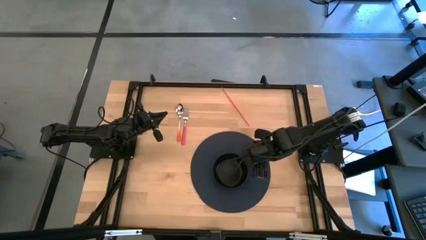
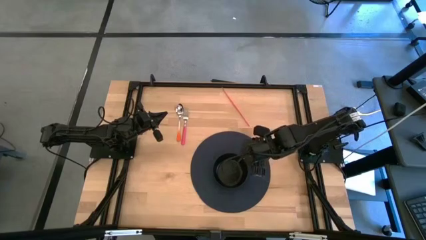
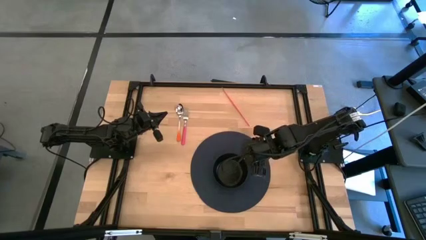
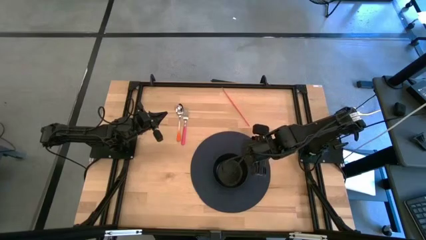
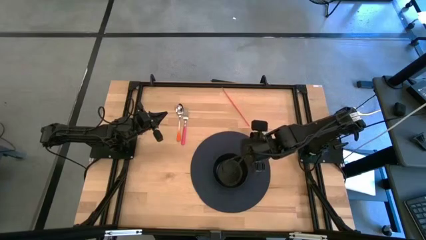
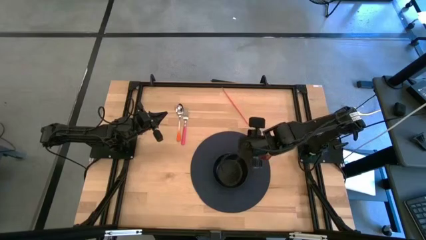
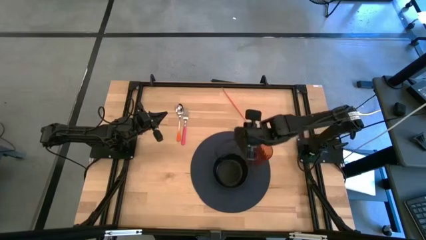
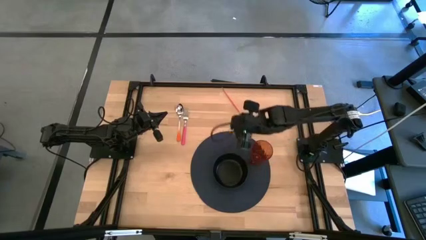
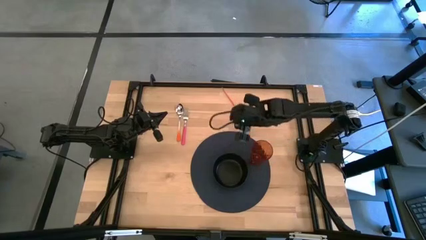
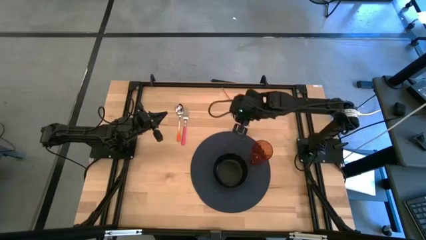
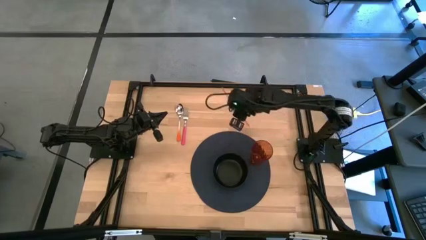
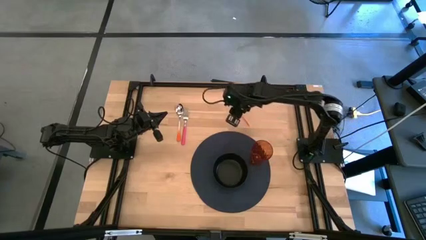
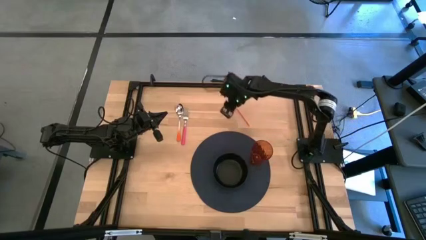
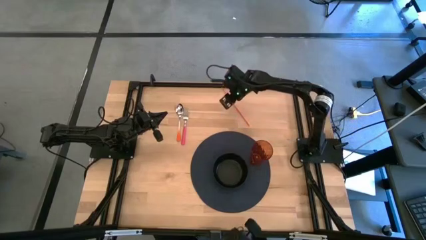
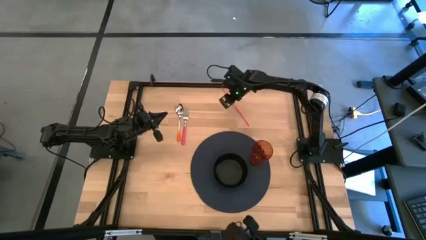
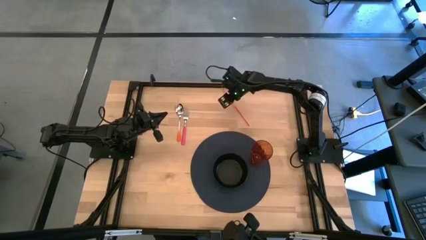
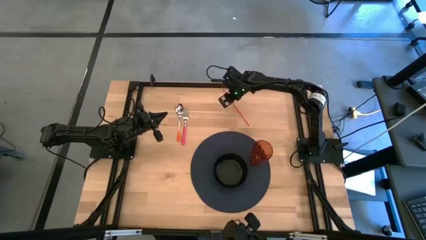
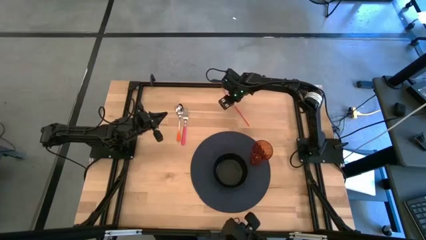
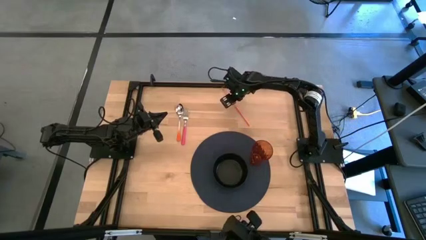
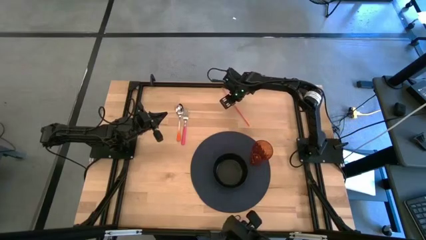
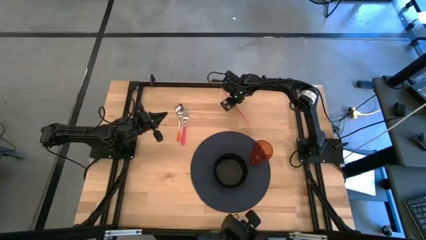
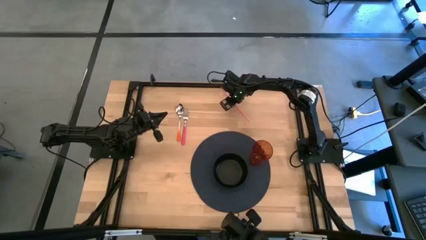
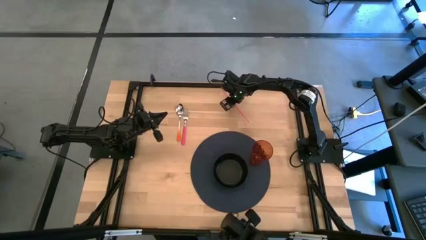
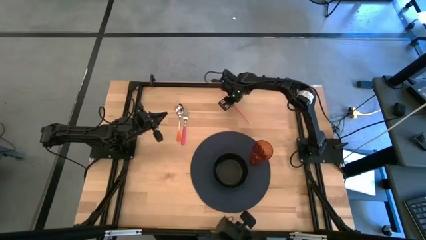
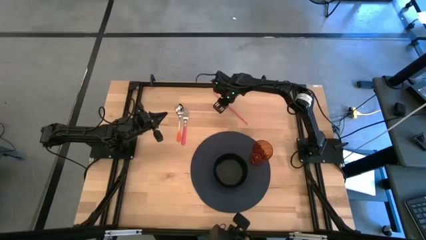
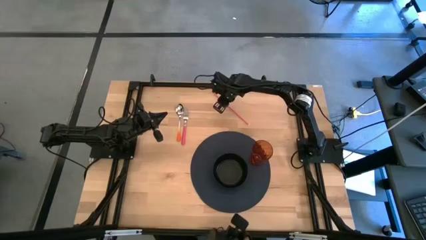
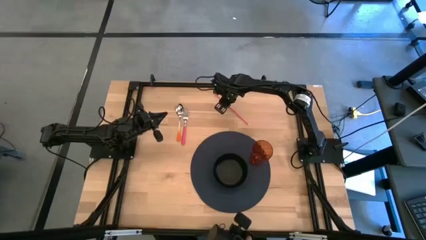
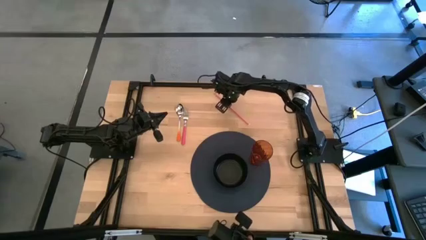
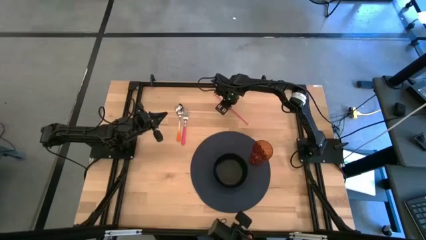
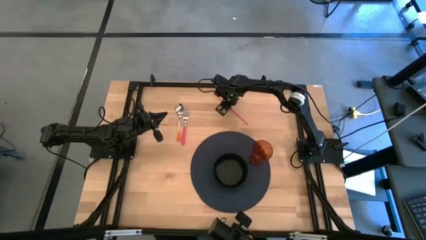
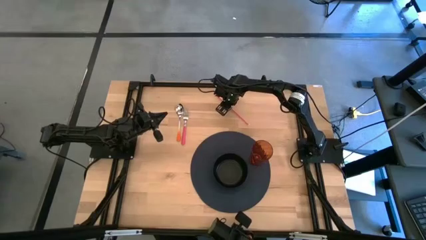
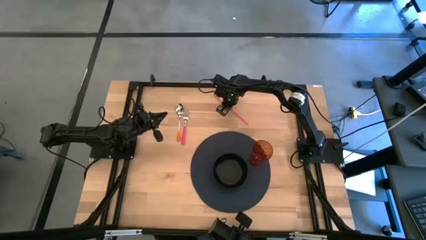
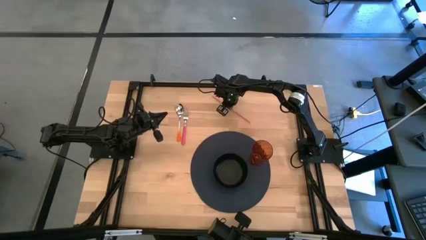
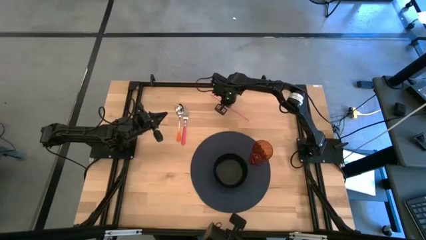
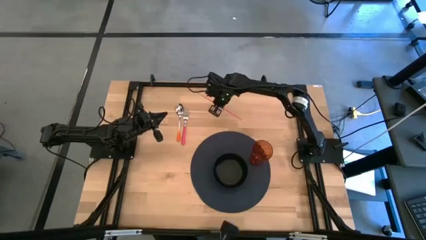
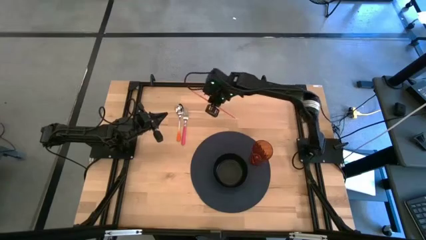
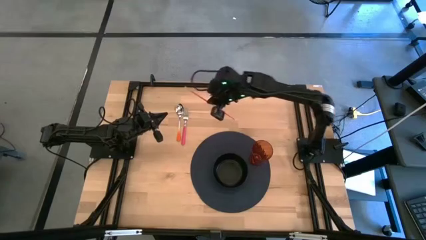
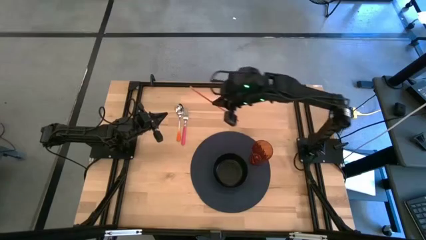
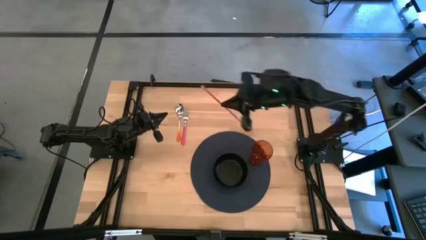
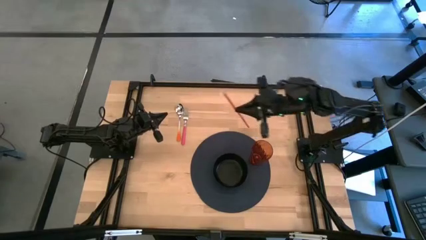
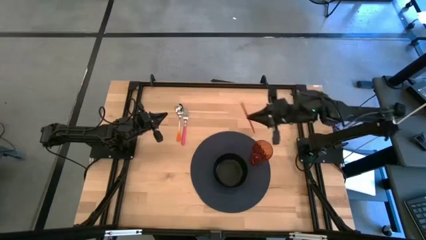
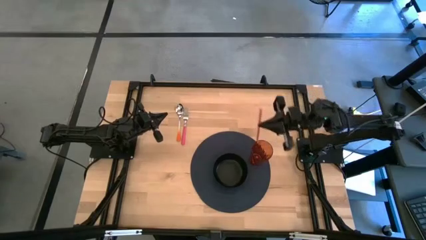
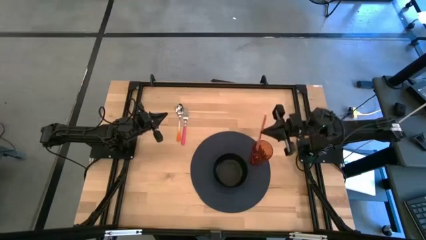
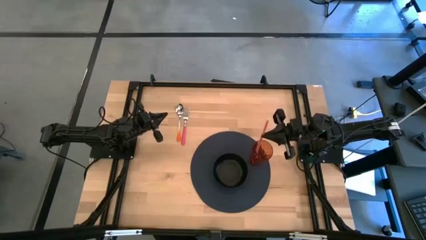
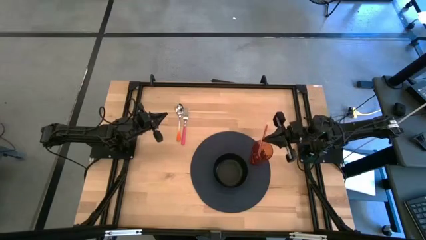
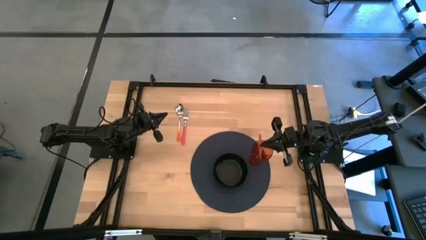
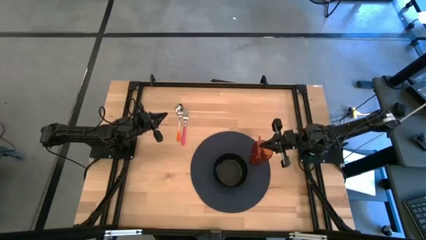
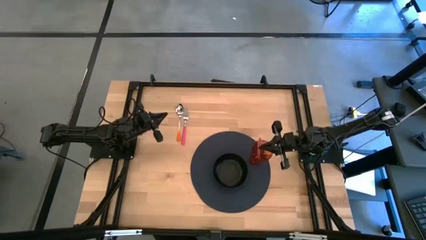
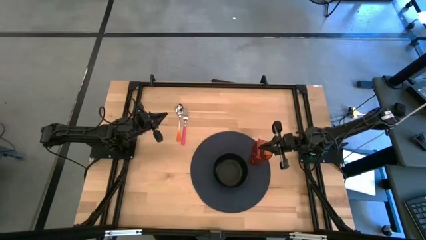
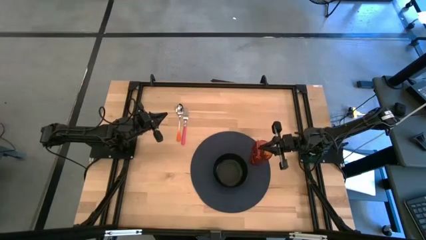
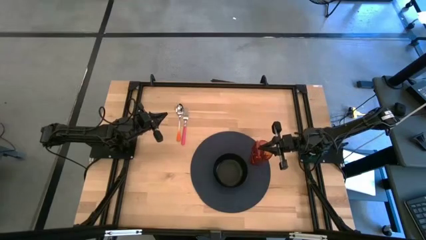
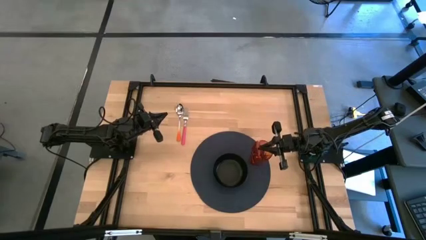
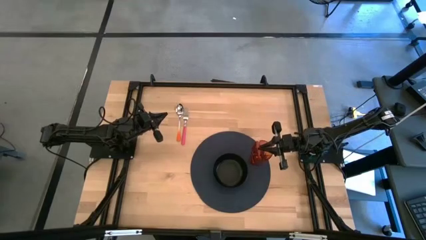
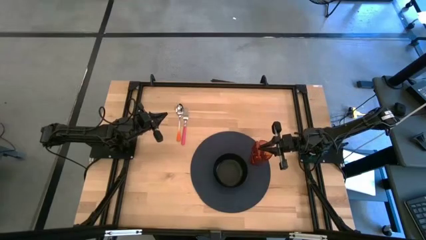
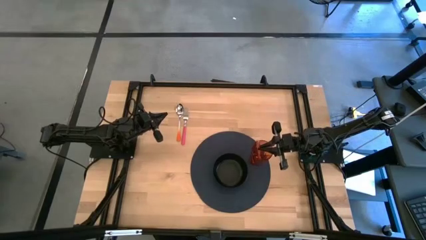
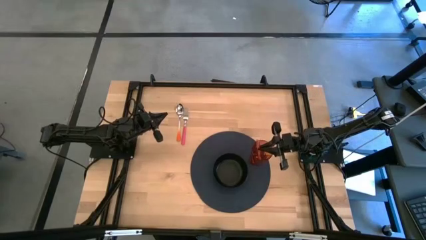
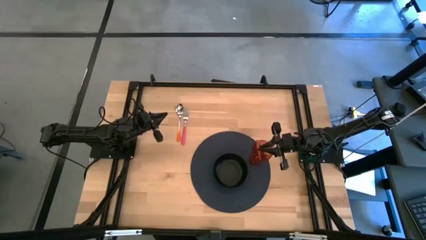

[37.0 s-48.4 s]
Task: Pick & Place Utensil
Put the red straw into the red cup on the blue mat

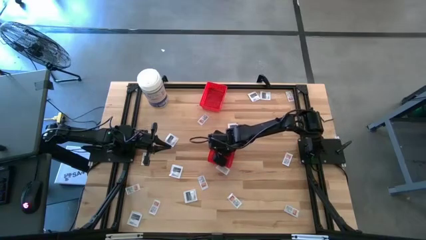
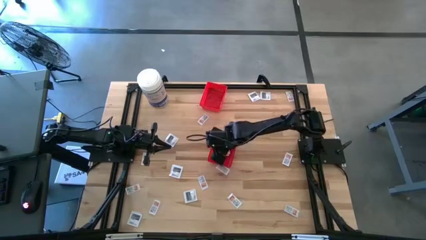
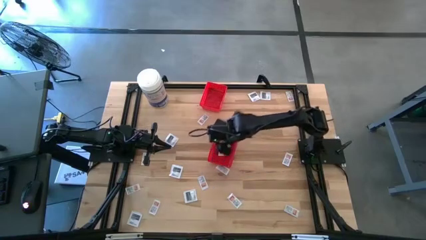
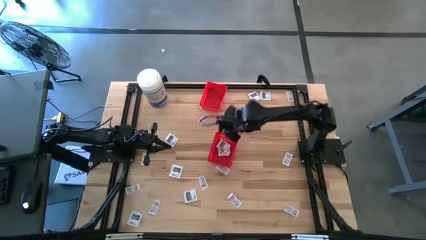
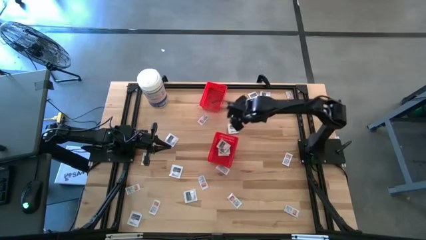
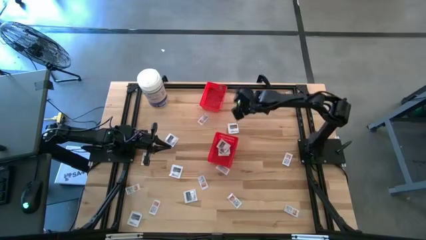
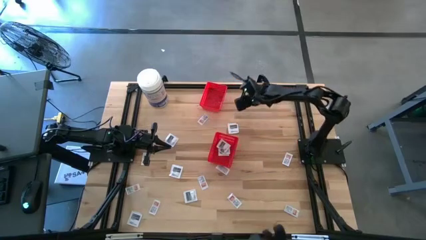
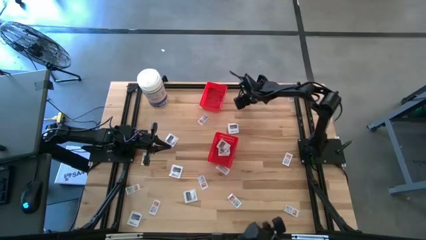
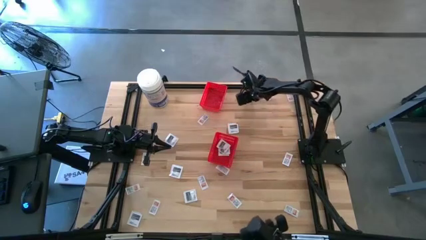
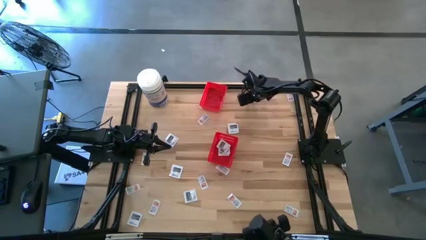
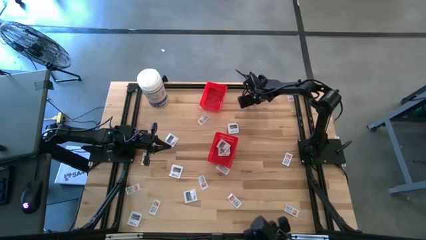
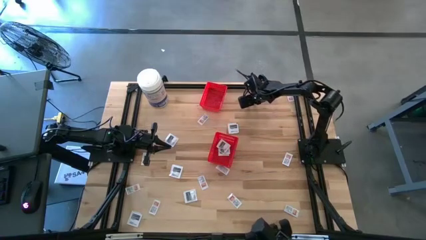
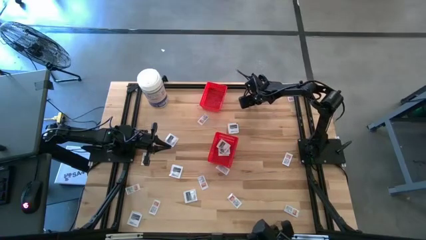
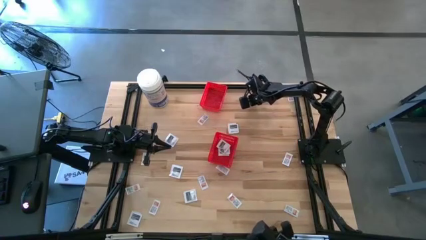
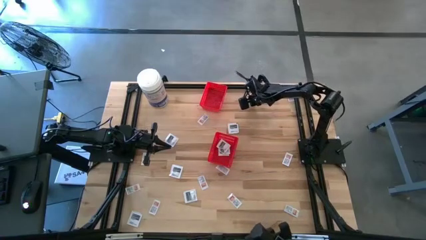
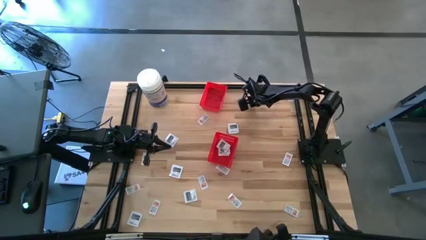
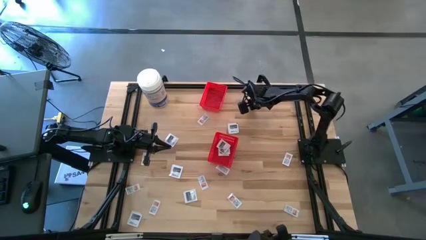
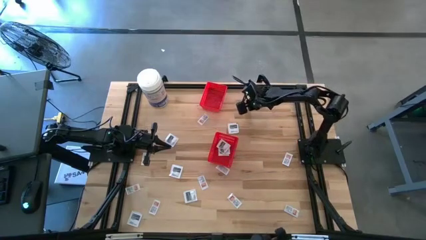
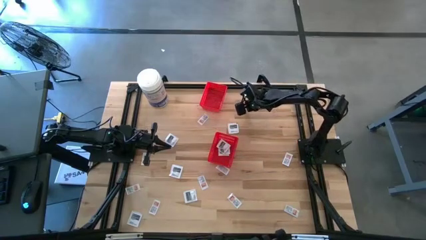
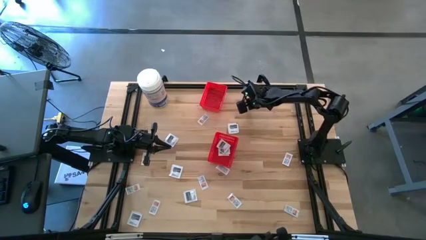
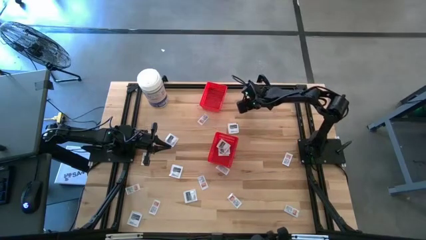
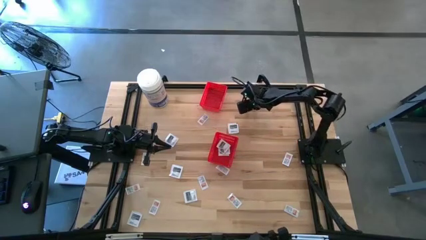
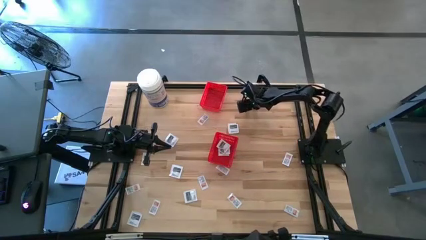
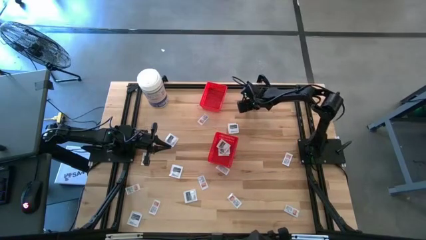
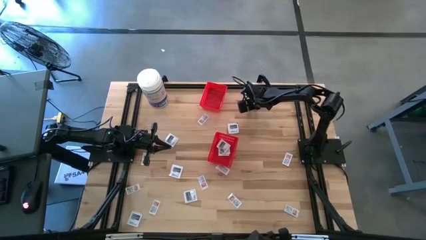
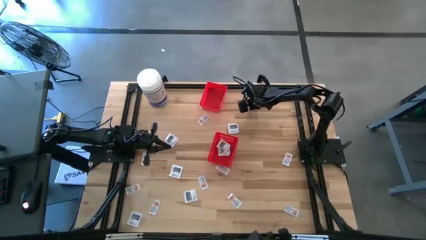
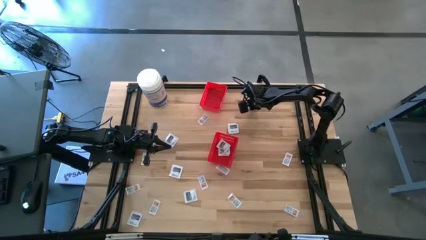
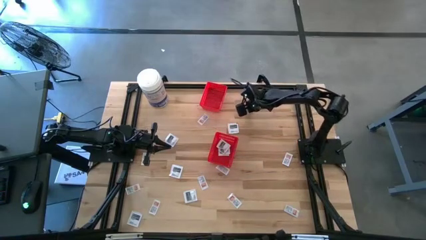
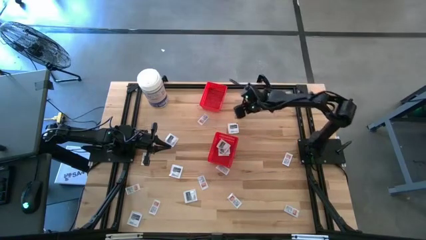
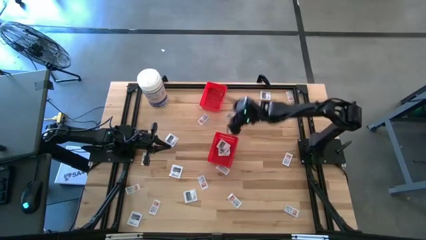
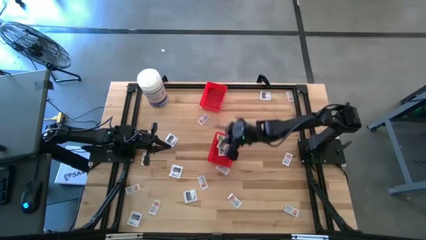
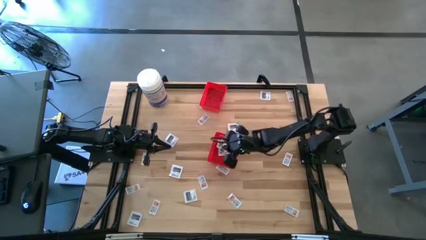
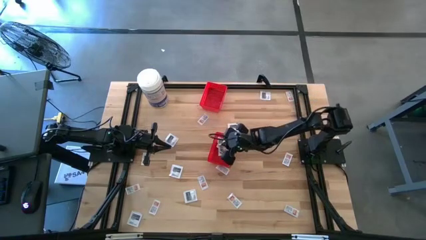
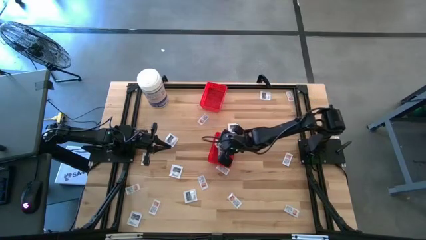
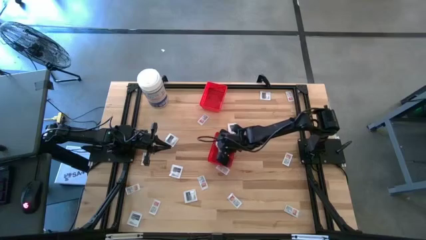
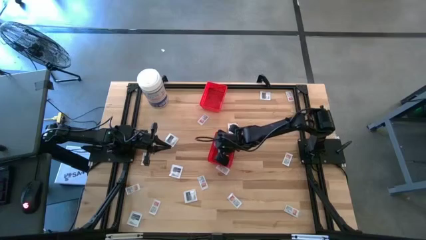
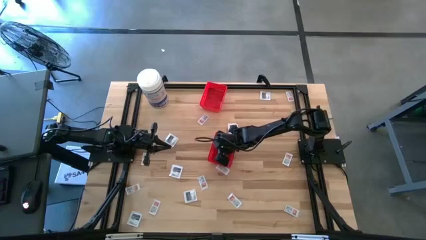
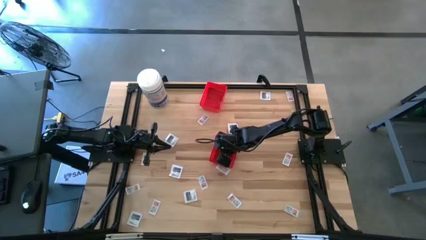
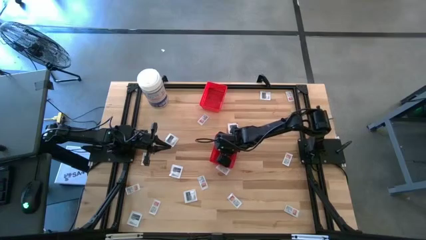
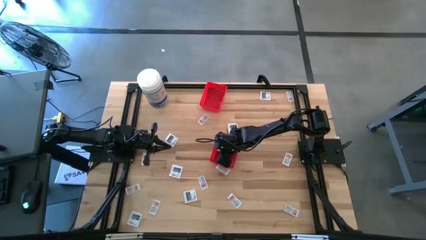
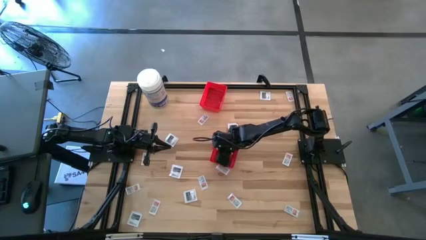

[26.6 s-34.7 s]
Task: Pick & Place First Aid Supplies
Put the white towelette pack into the bottom red bin
